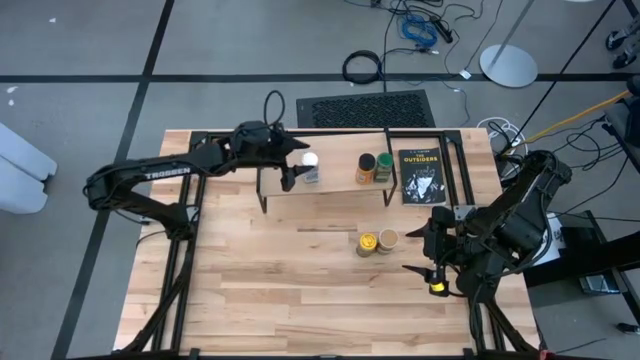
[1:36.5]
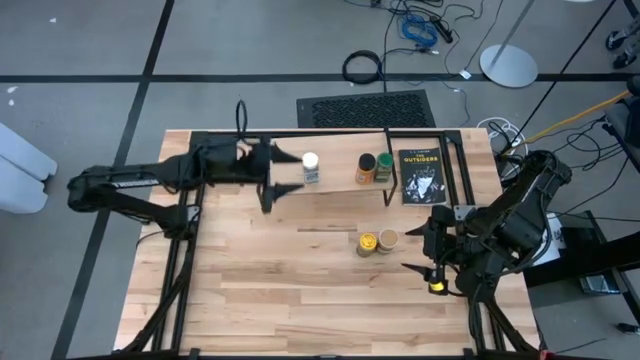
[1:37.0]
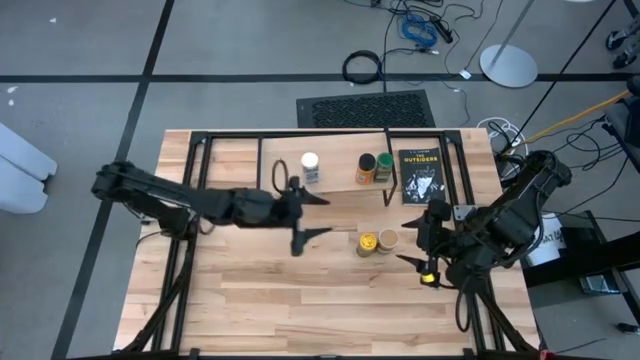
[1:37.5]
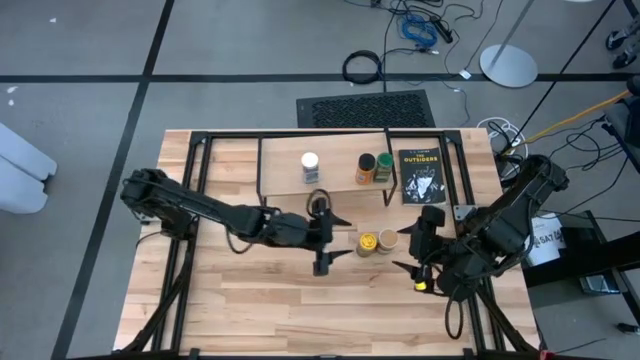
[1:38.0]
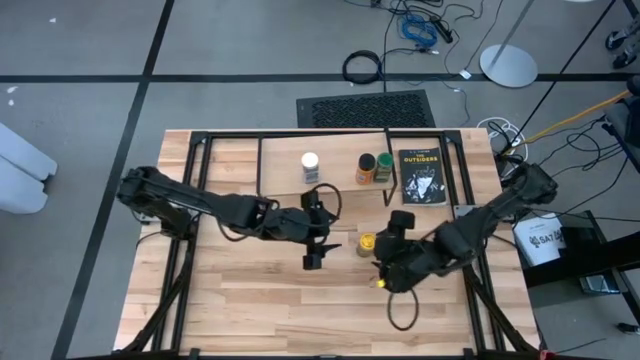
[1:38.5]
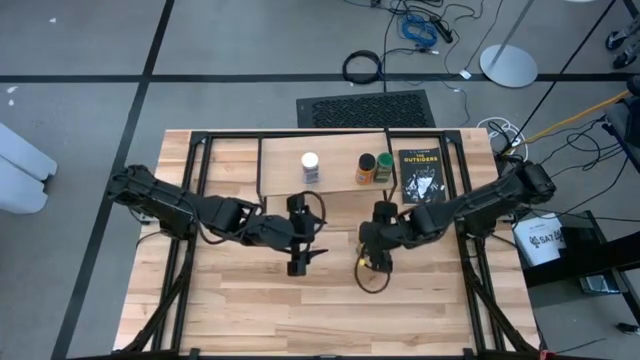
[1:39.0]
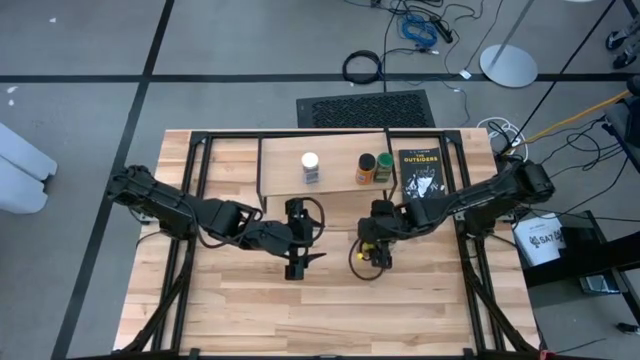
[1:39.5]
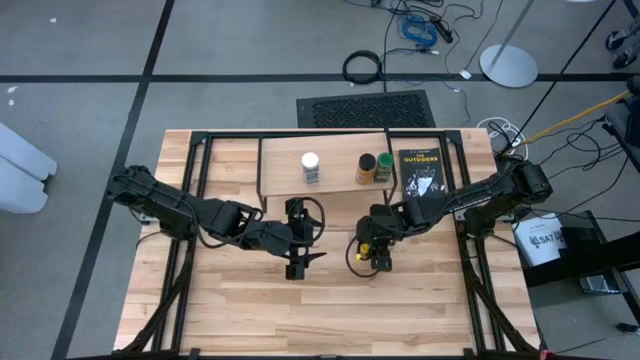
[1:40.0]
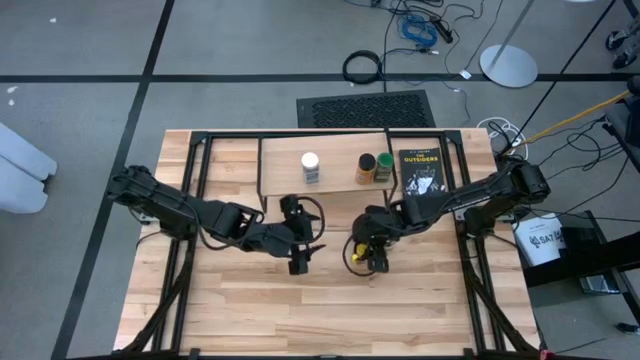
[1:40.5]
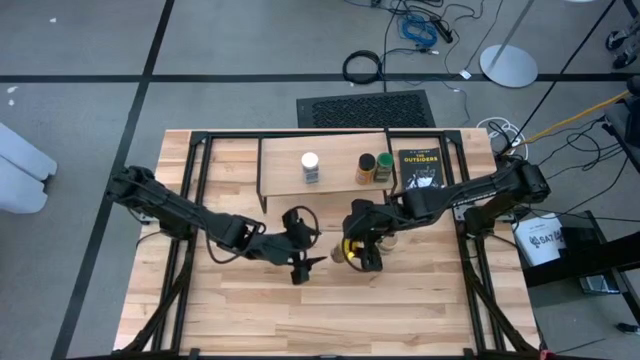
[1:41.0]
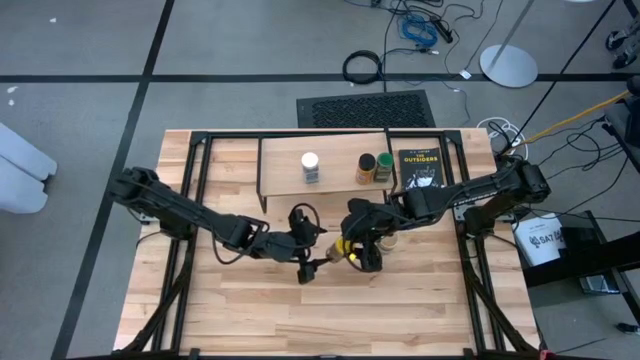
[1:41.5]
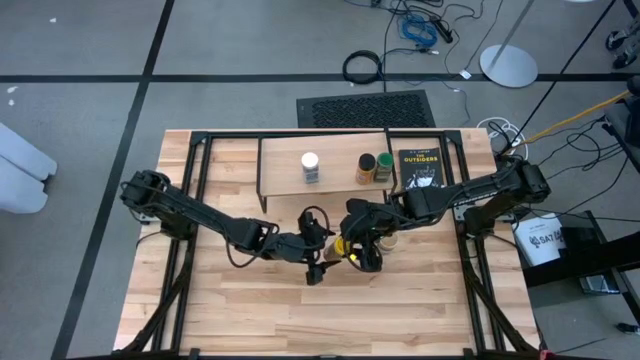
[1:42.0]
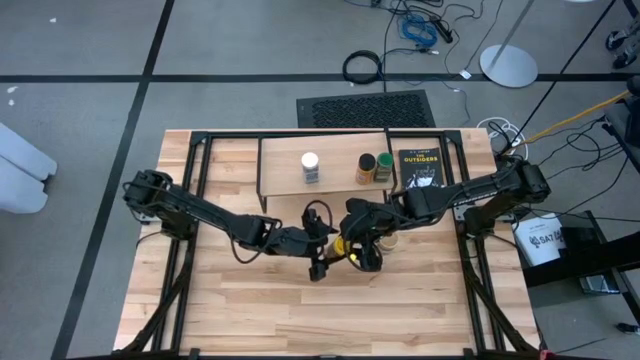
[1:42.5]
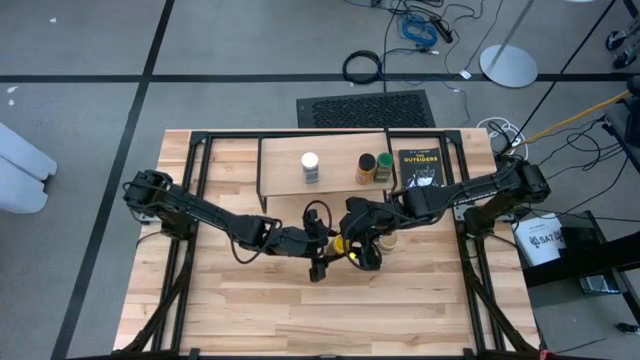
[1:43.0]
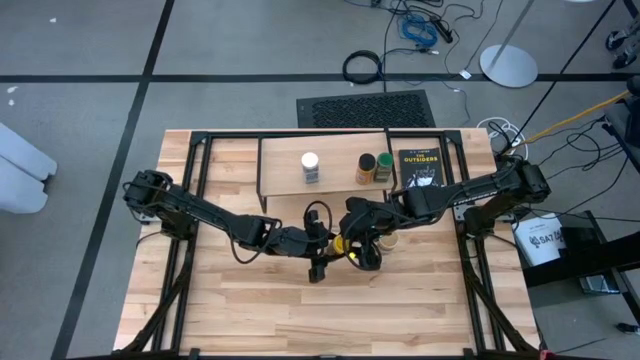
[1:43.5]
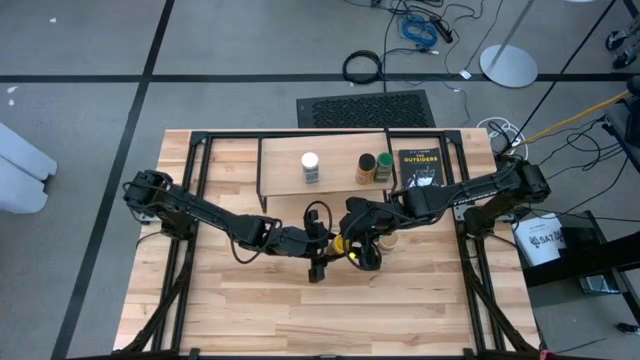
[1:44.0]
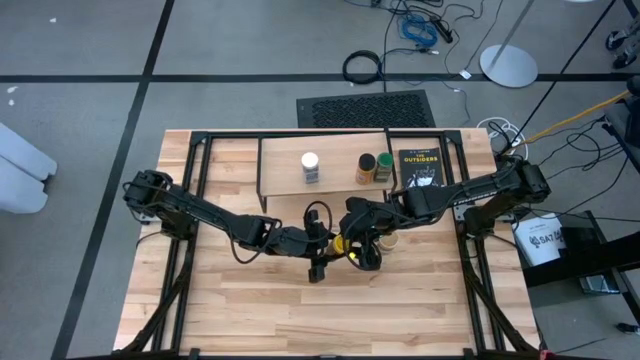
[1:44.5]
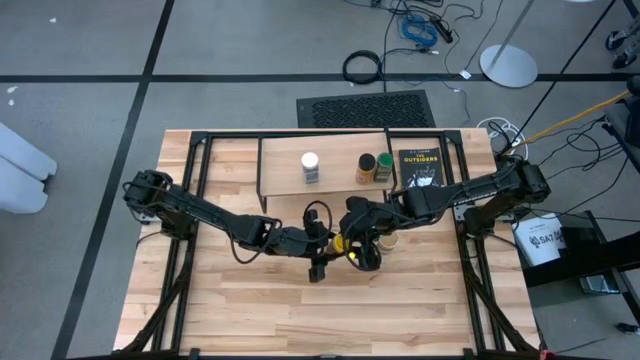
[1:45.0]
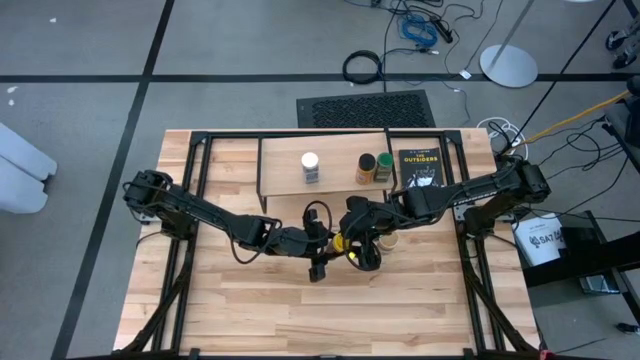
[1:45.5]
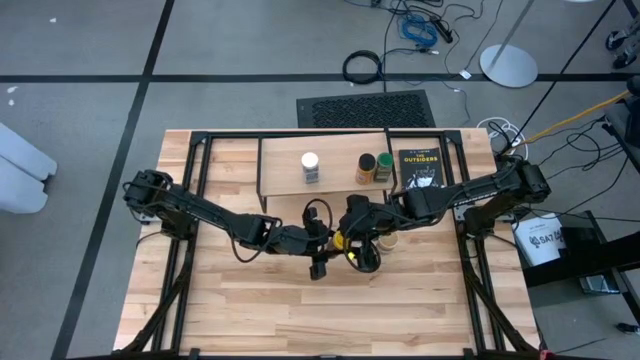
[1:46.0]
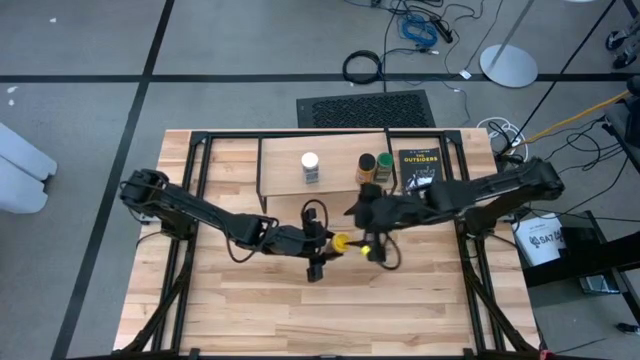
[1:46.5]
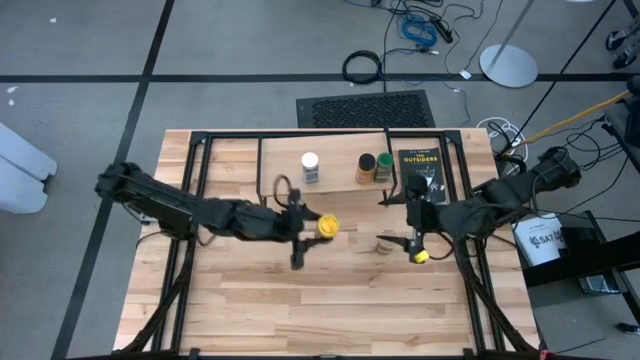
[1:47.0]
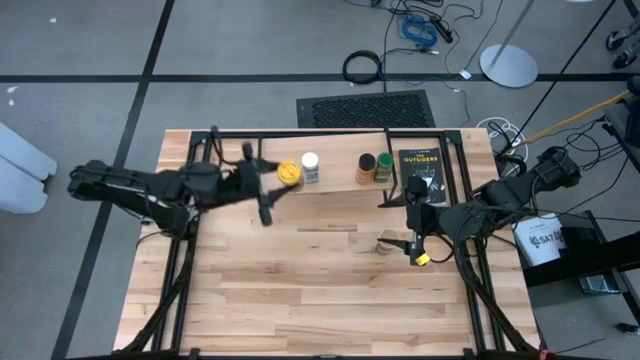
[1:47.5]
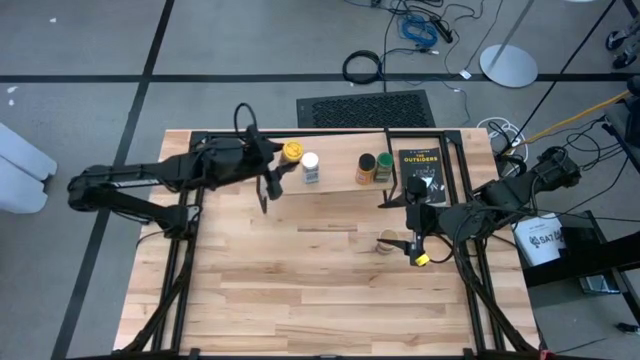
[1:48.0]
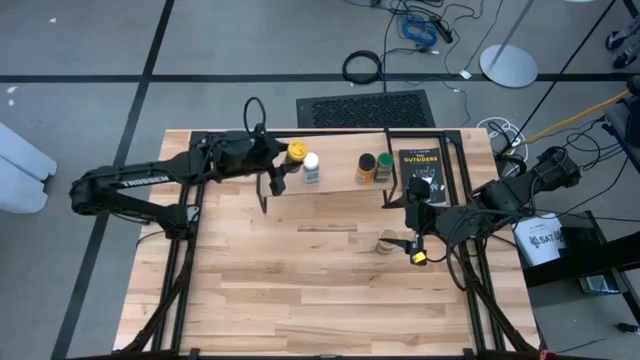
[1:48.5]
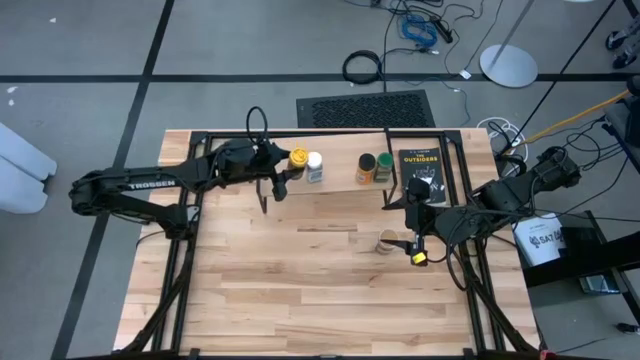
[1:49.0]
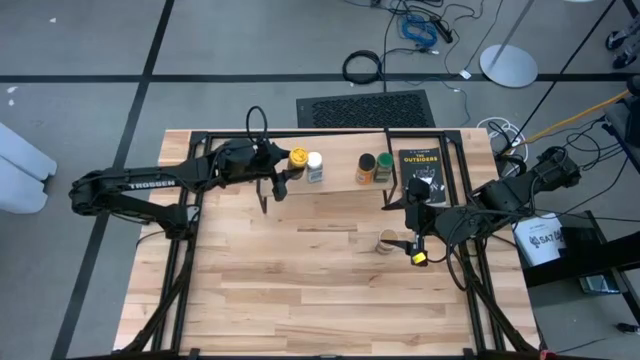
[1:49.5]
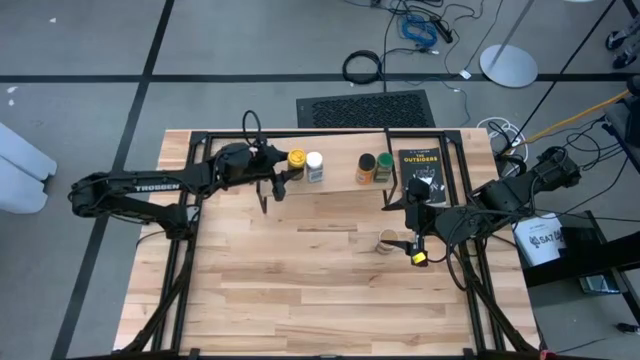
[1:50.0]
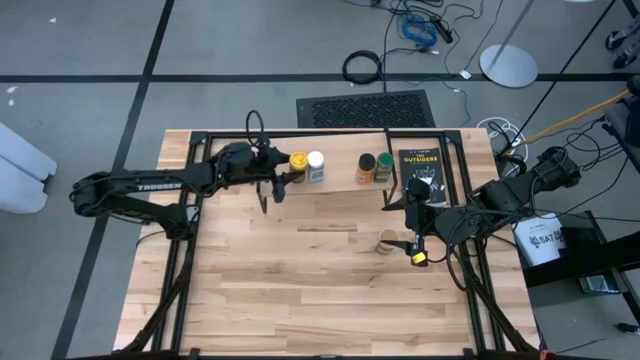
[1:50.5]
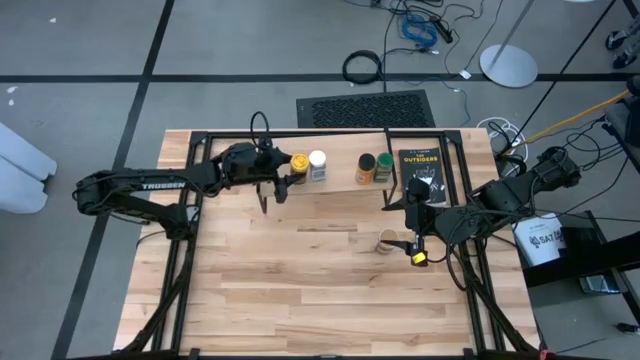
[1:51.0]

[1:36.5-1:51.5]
Task: Shelf spices
Put the yellow seasoning bottle on the shelf

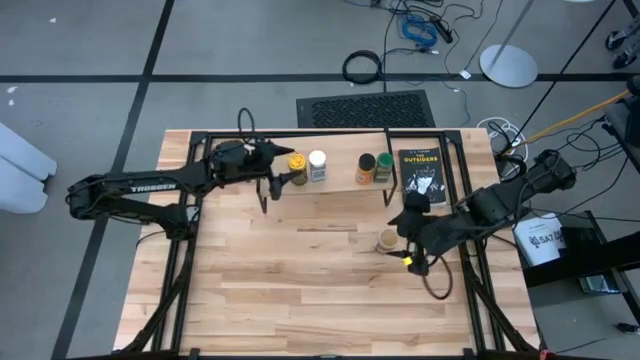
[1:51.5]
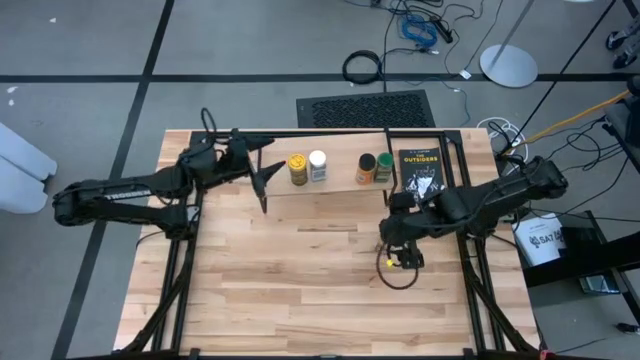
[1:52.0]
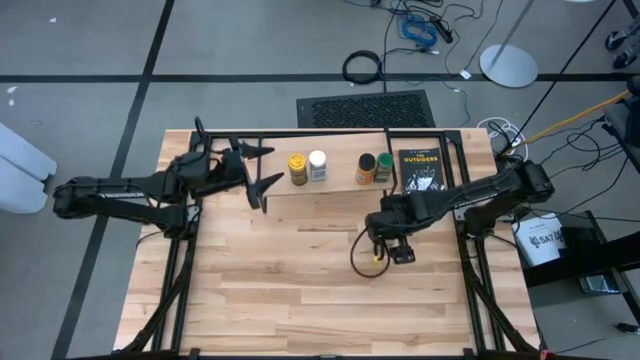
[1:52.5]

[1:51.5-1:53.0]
Put the golden seasoning bottle on the shelf

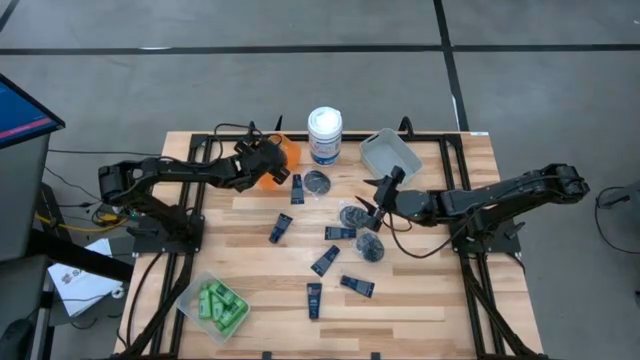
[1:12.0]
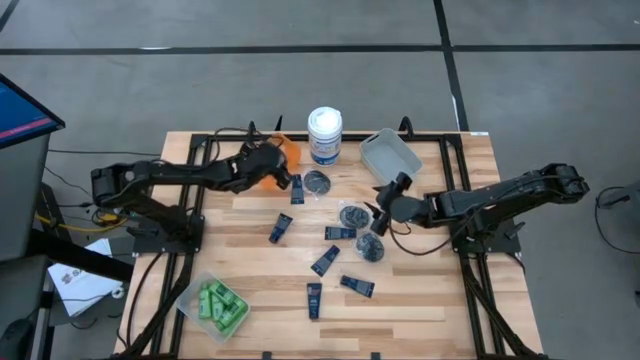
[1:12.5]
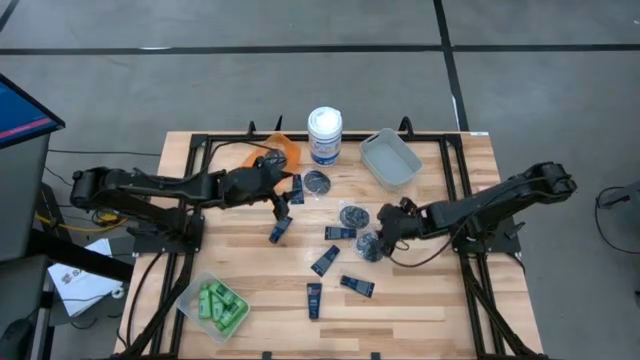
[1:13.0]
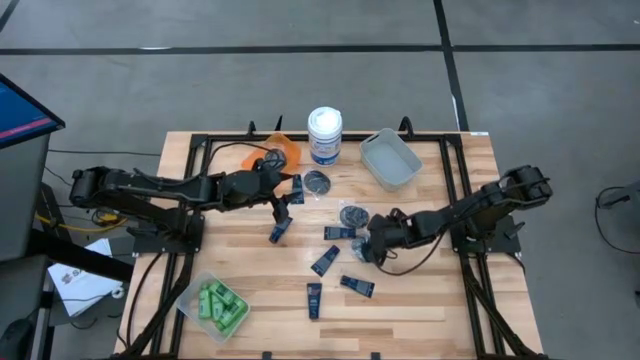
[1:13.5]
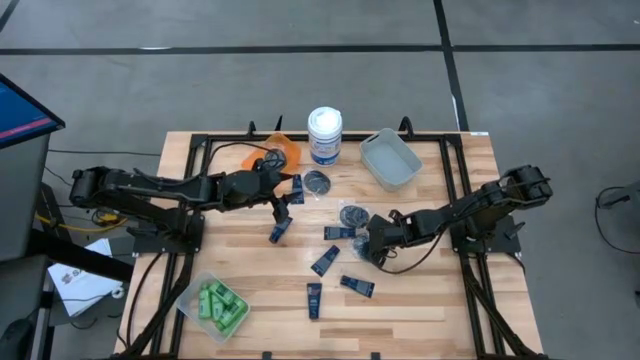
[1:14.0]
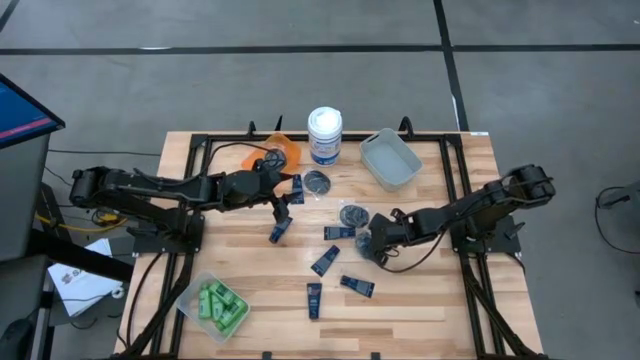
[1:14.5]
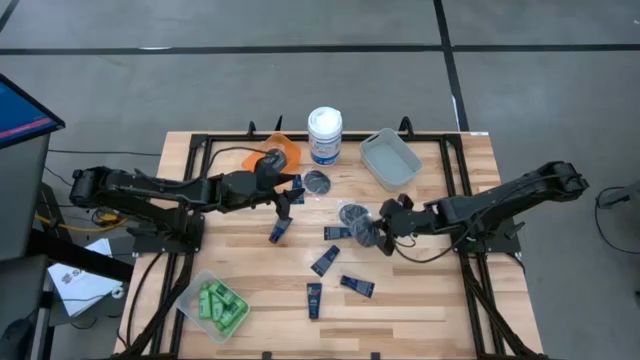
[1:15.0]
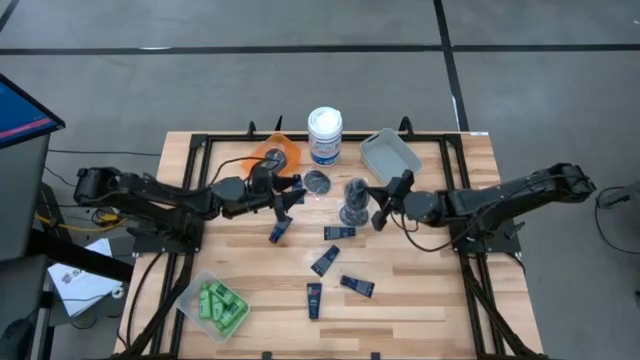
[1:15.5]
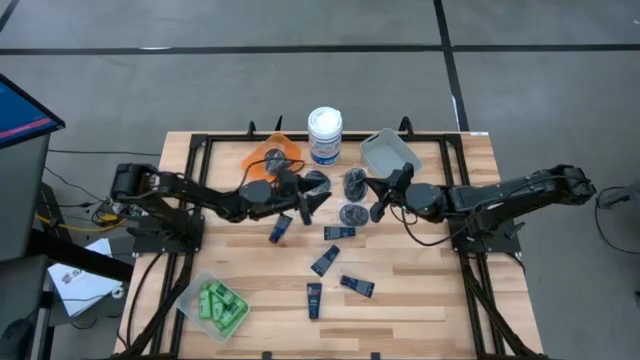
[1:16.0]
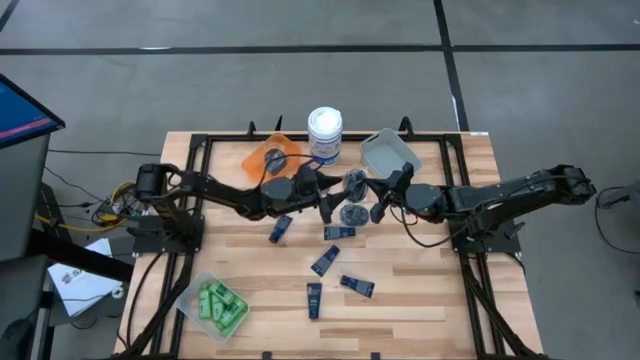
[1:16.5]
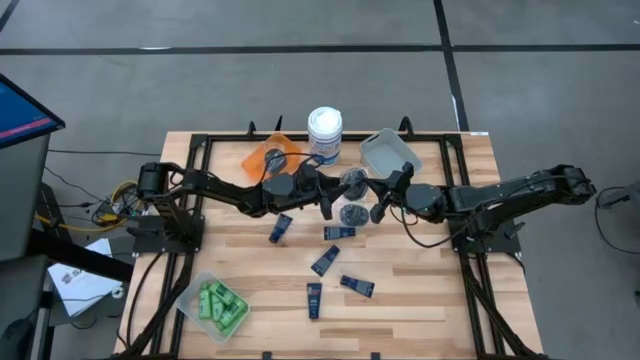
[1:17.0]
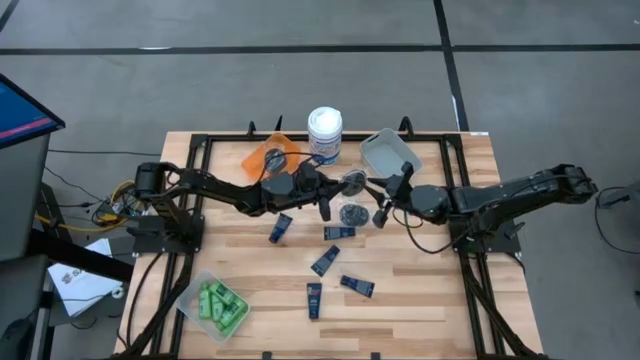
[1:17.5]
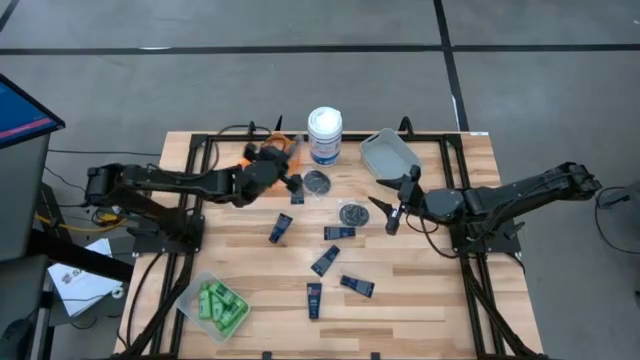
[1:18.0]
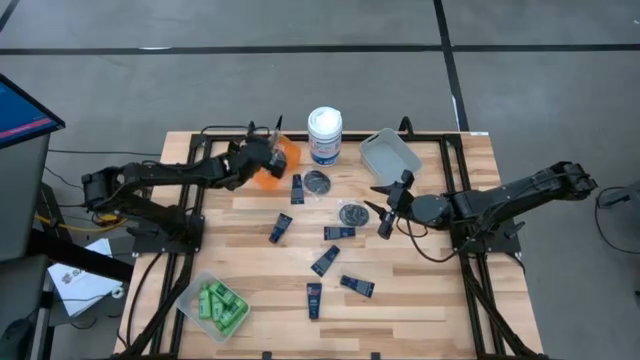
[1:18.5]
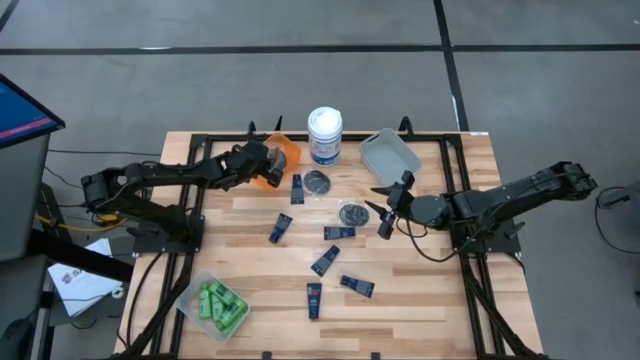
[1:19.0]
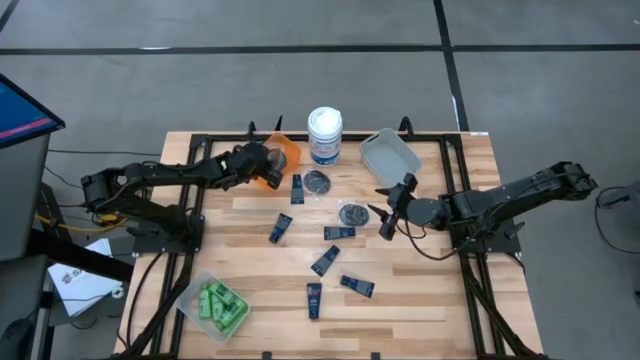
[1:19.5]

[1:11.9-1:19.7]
Task: Pick & Place Travel size toiletries
Put the hair brush into the orange bin
